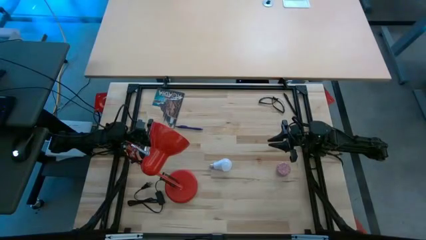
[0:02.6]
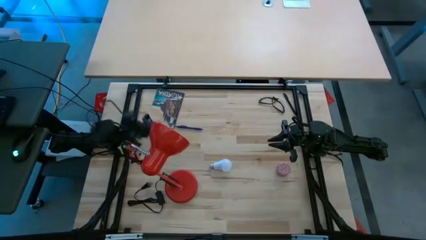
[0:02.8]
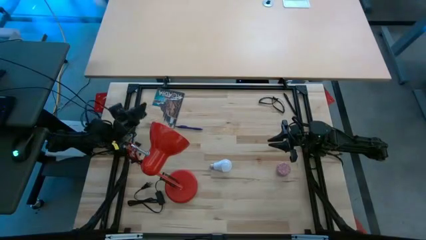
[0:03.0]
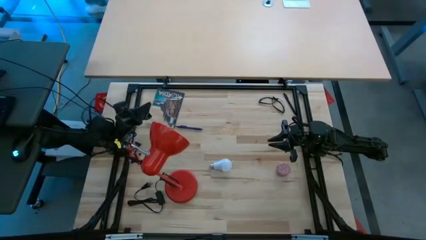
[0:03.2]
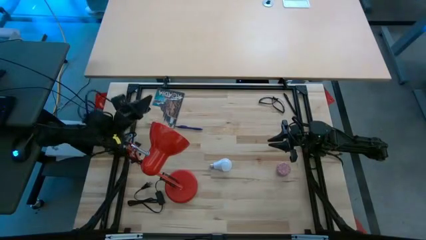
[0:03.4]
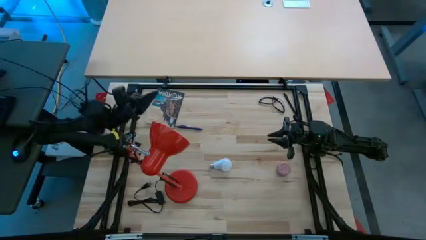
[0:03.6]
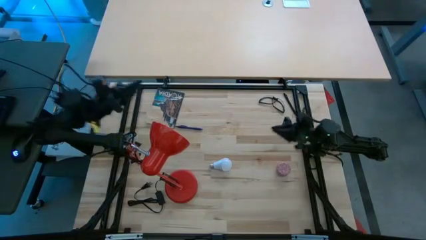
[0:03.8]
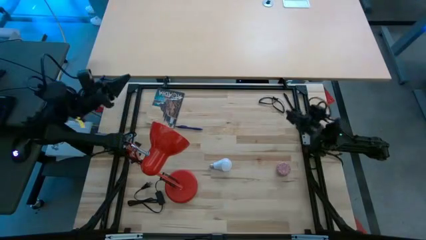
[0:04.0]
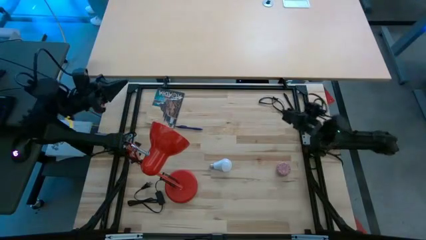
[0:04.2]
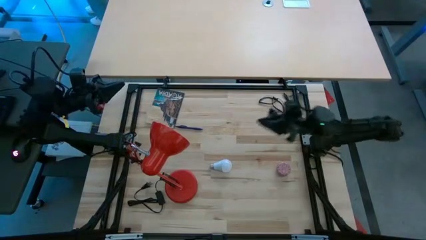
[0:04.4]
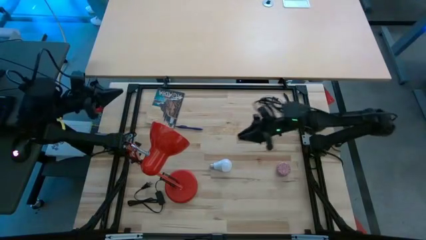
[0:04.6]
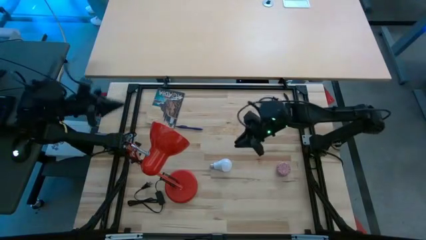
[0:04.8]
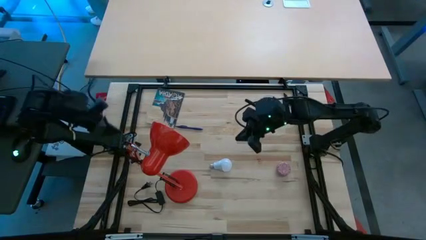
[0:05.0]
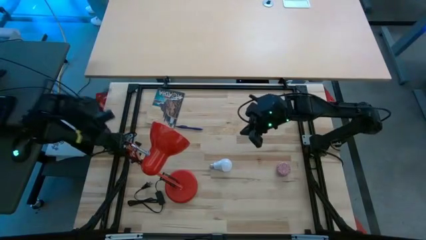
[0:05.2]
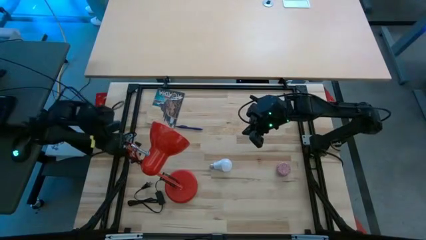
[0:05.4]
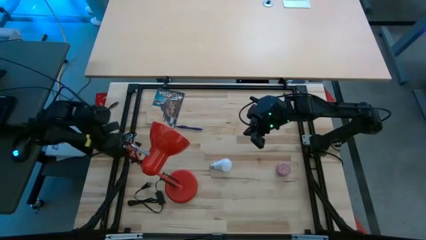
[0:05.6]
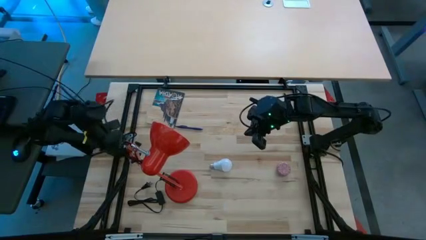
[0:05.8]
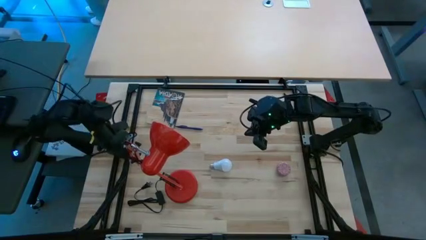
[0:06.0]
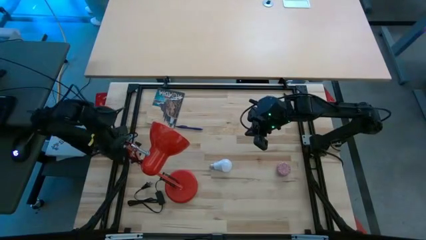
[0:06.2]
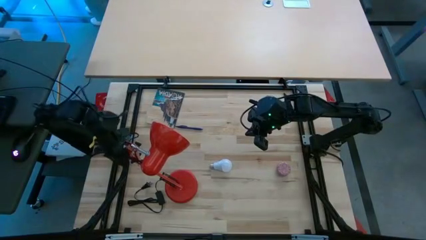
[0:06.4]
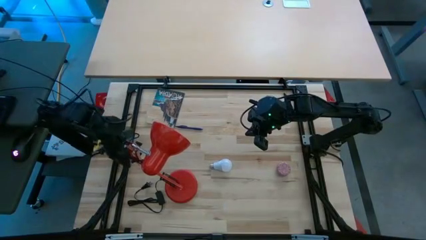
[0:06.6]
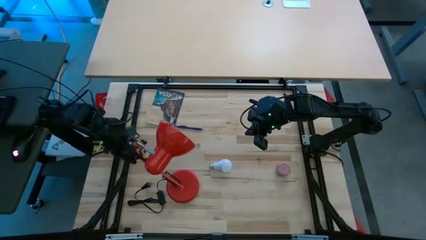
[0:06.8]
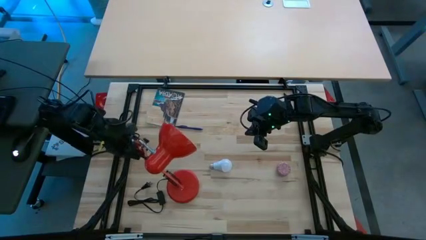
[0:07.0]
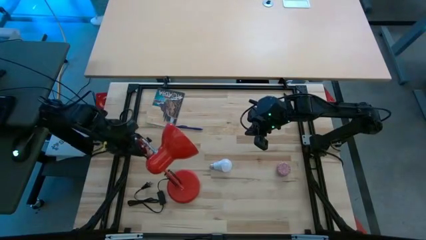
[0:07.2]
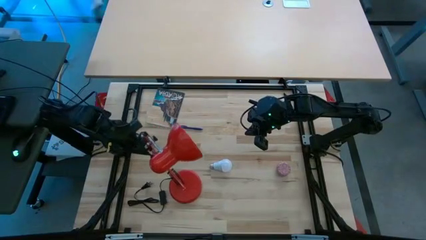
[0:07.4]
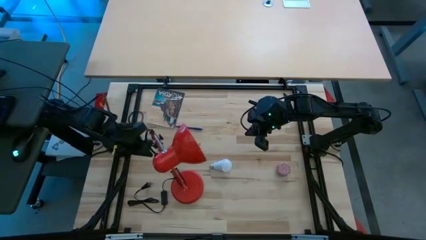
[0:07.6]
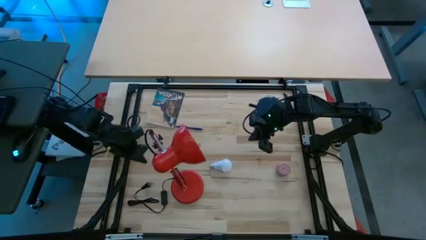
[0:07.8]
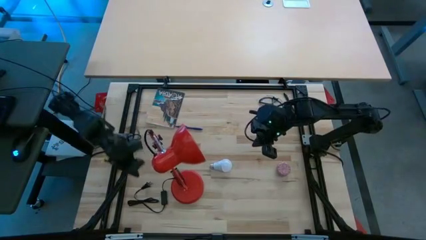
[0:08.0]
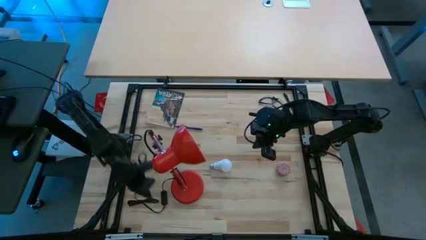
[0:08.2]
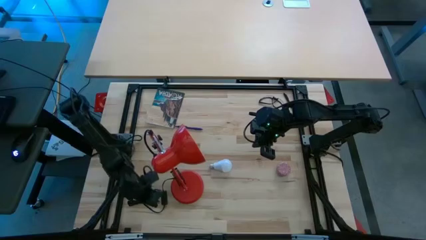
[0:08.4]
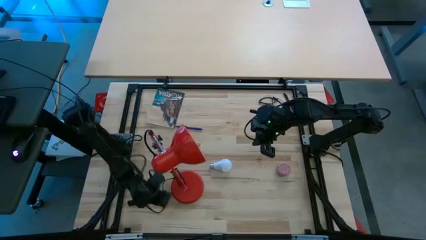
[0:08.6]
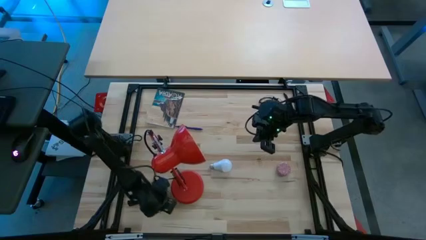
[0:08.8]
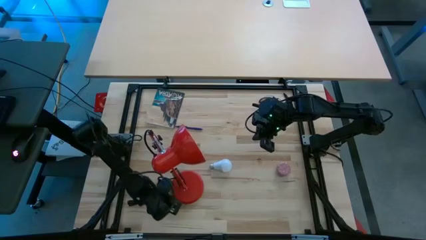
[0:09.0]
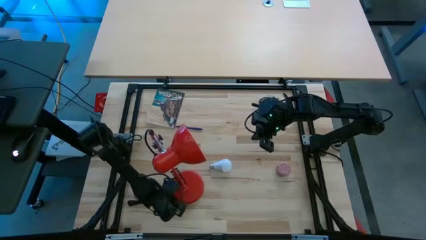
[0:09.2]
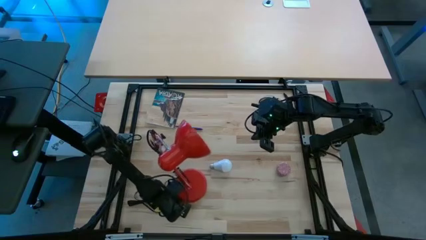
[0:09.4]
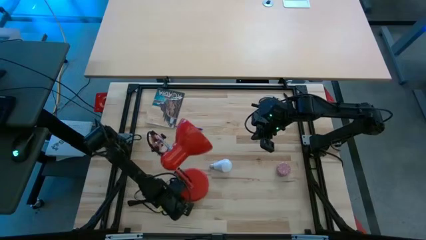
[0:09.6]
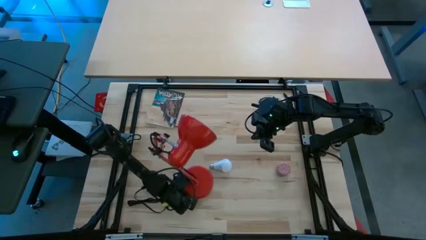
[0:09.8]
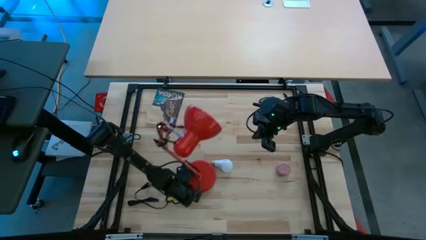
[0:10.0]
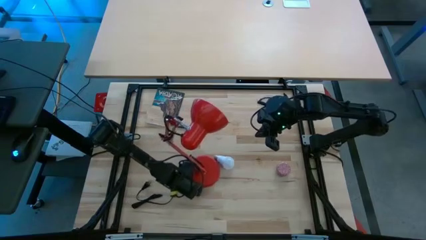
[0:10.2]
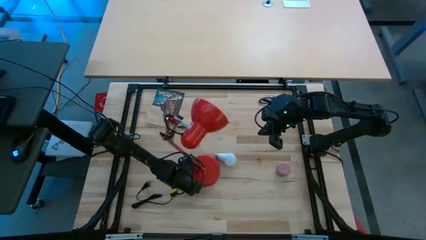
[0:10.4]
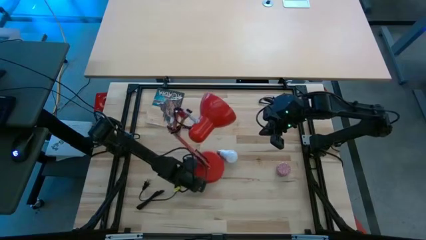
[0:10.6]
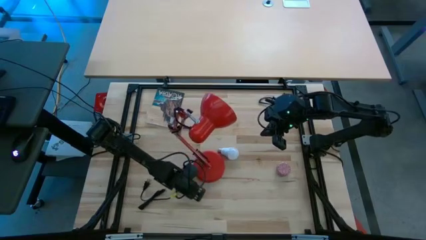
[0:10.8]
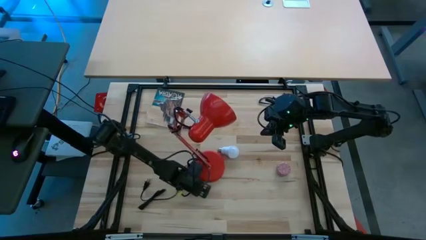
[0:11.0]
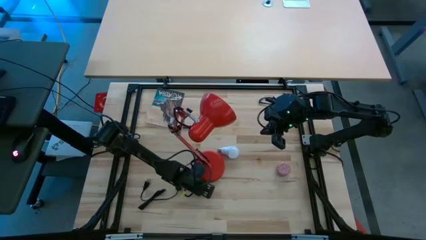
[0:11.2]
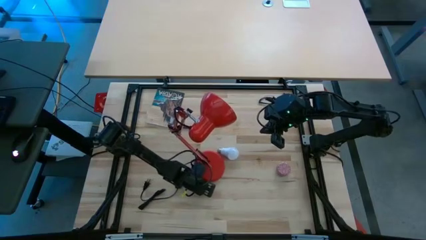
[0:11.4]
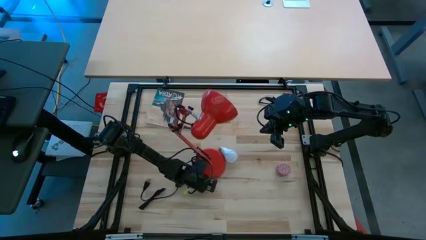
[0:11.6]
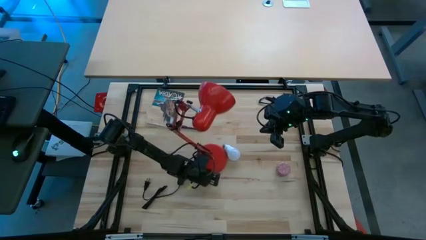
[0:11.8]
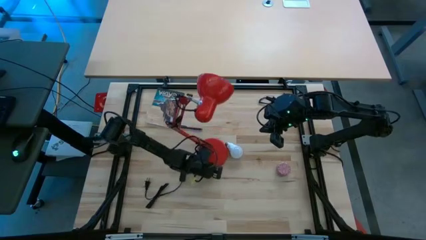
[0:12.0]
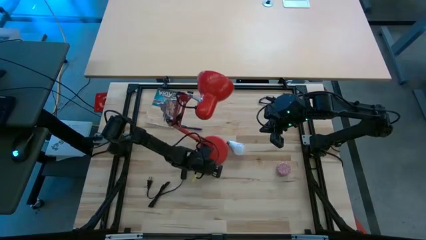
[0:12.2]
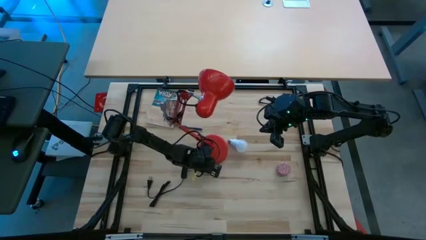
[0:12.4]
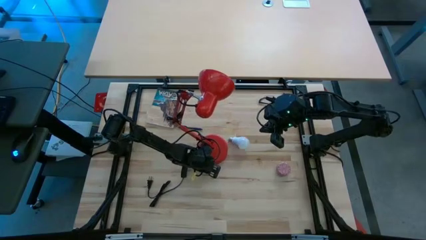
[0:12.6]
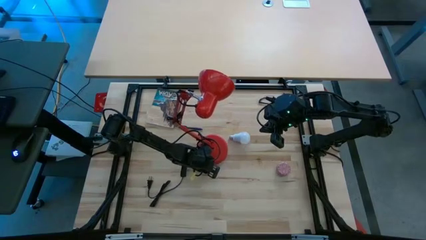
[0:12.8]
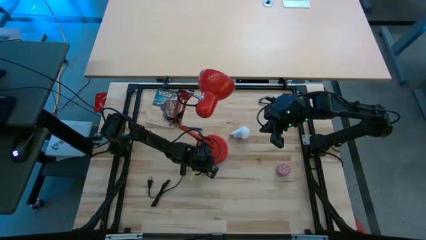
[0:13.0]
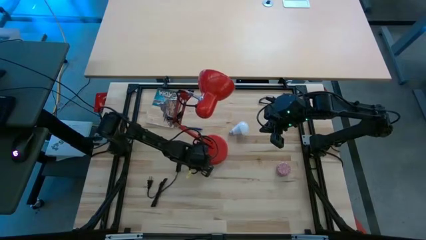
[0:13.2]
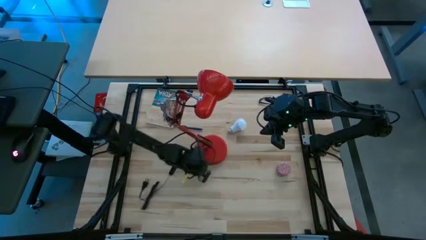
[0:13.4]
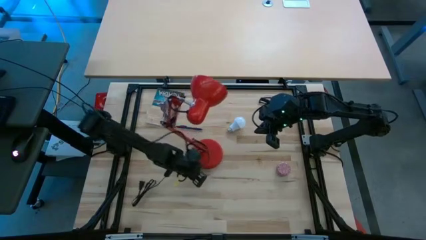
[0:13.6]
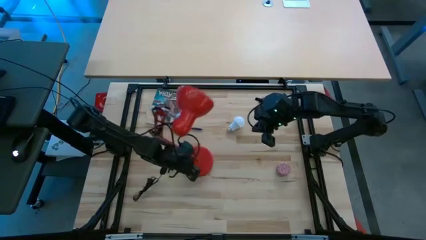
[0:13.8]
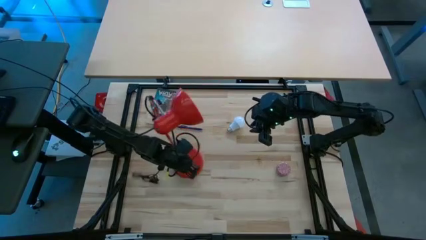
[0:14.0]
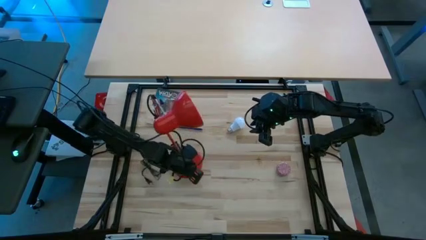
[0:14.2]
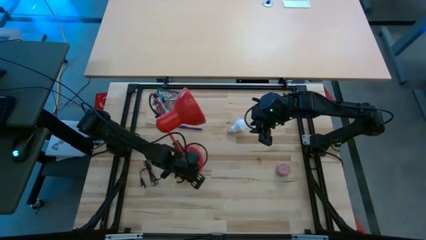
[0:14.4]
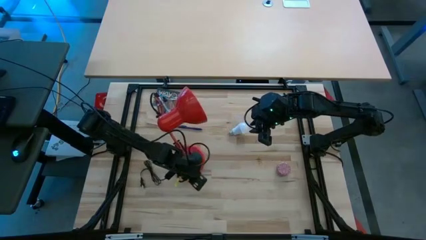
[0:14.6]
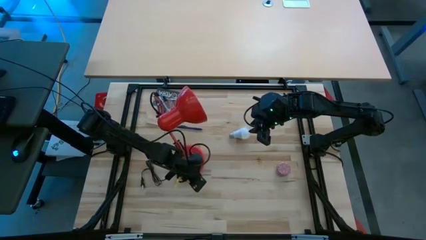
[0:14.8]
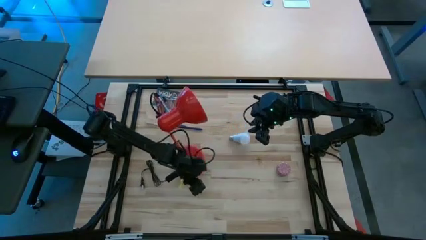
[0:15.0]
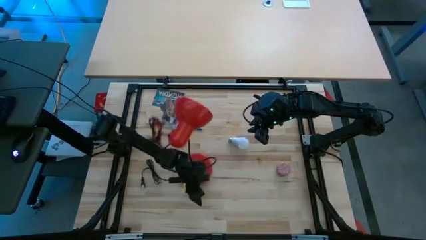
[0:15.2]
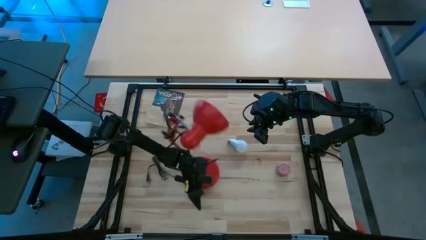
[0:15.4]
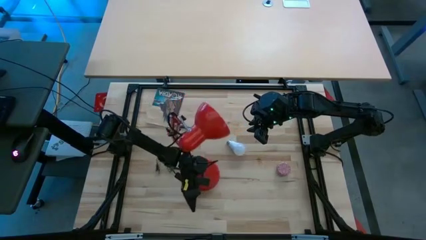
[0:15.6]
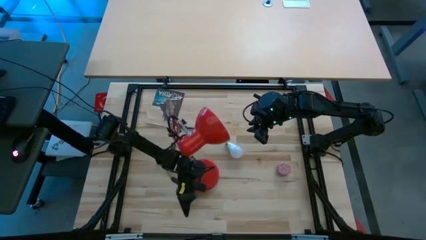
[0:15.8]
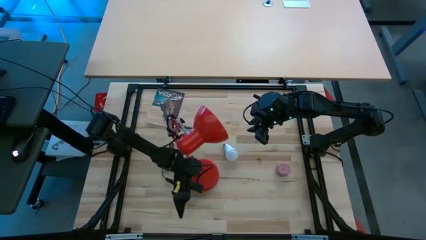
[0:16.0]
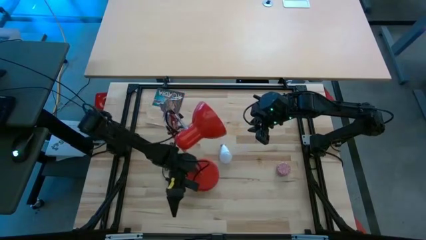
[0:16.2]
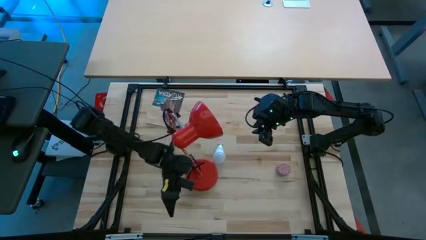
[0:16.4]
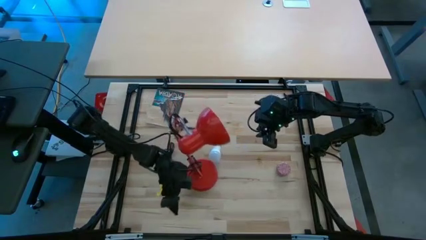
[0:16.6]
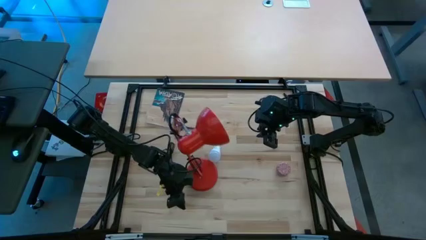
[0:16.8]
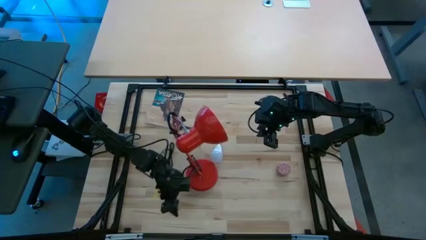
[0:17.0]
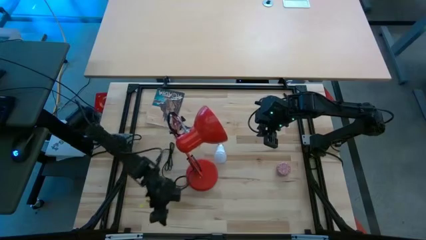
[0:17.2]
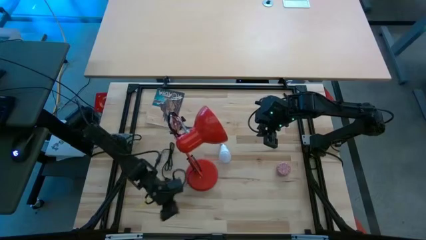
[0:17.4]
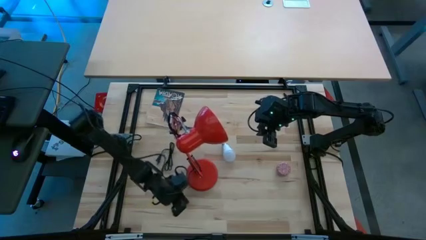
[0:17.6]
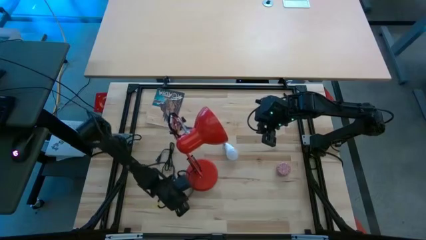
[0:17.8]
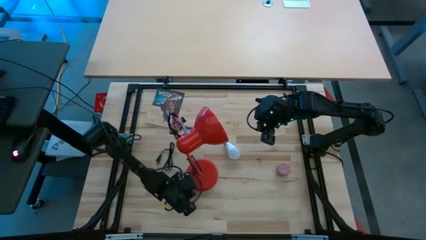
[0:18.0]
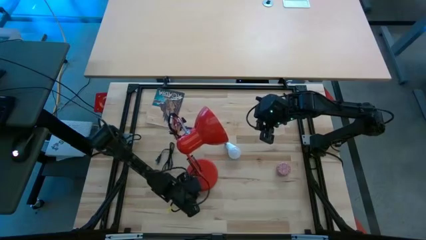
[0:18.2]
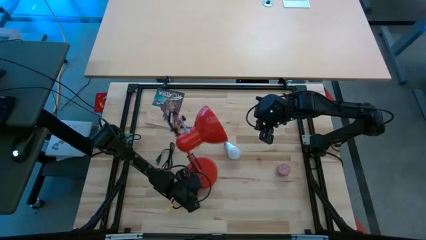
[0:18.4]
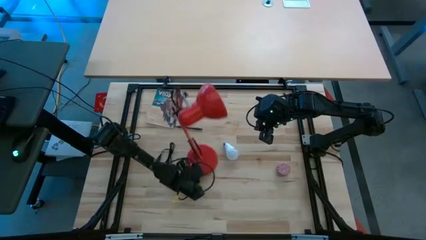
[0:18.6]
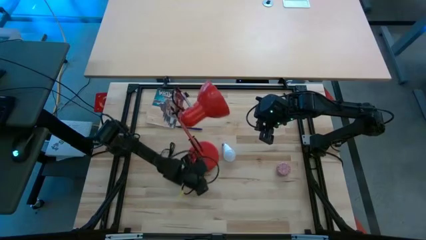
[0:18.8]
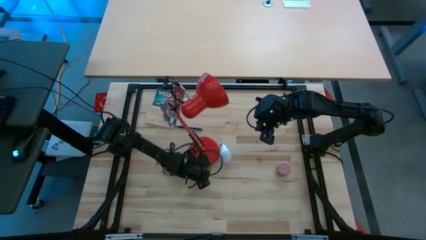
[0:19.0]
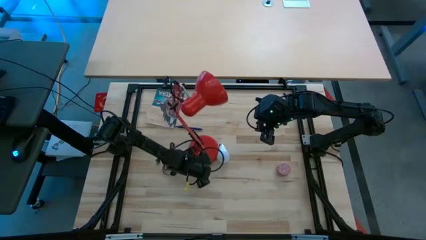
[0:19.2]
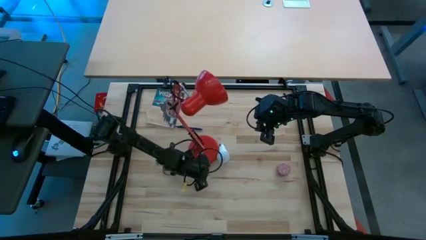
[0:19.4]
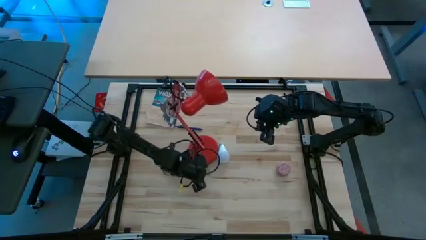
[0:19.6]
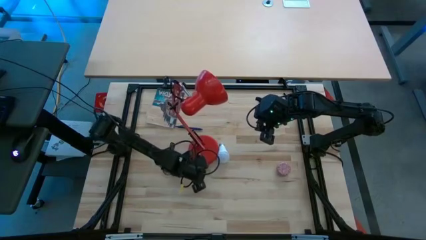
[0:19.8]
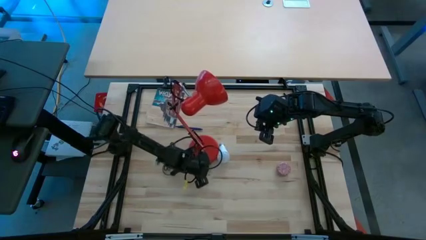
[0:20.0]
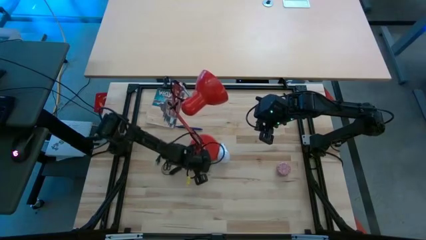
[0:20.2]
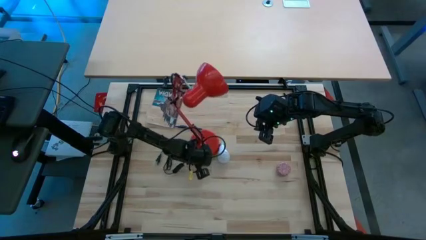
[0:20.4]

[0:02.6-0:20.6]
Task: Screw lightbulb
Insert the lightbulb on the lamp
